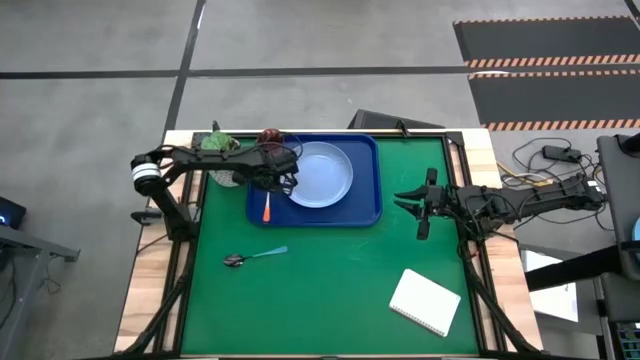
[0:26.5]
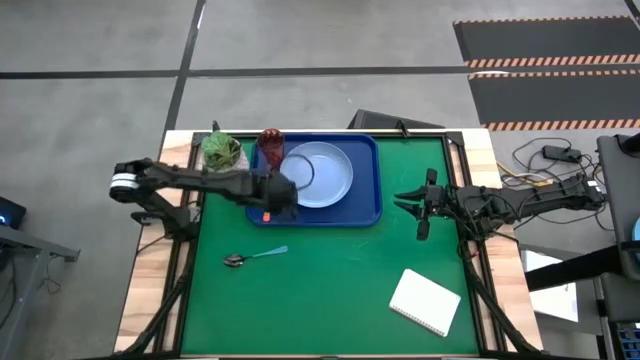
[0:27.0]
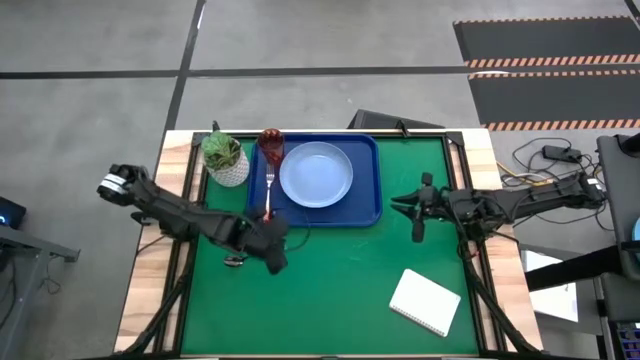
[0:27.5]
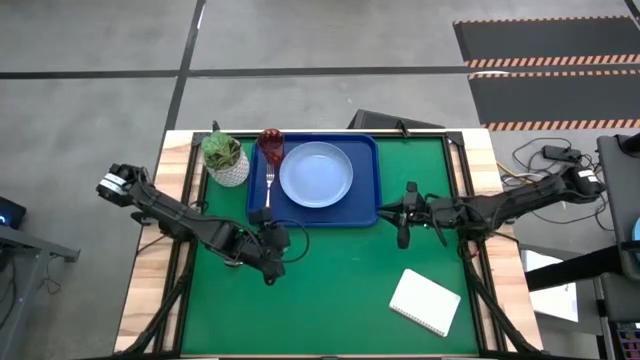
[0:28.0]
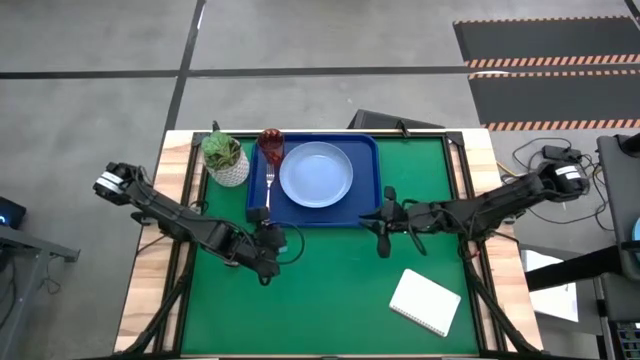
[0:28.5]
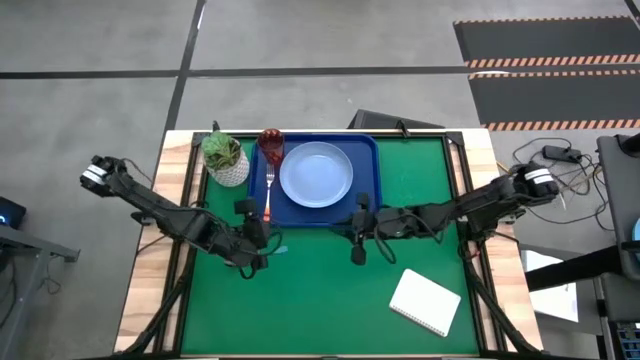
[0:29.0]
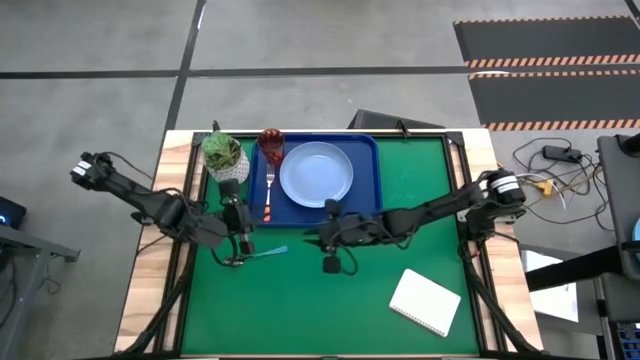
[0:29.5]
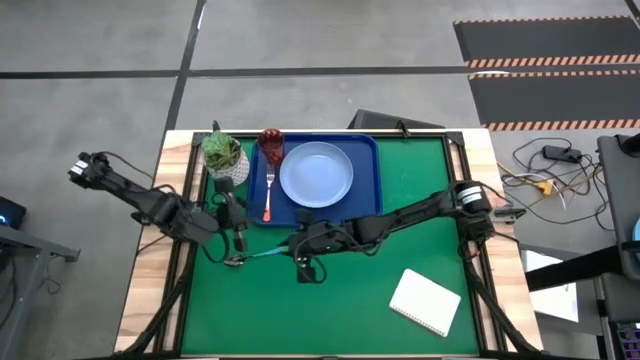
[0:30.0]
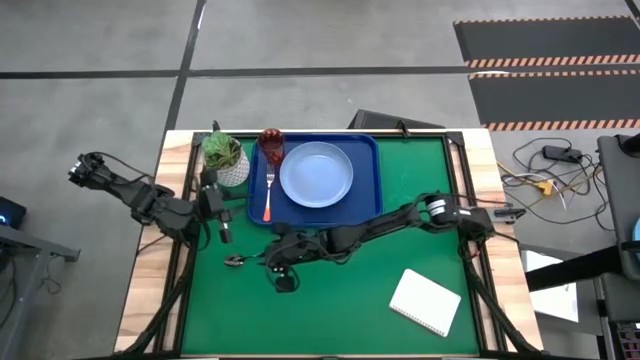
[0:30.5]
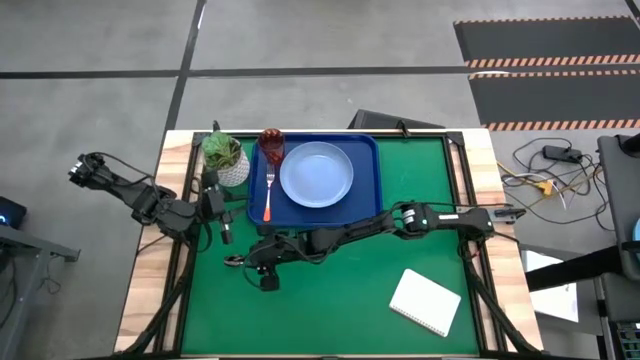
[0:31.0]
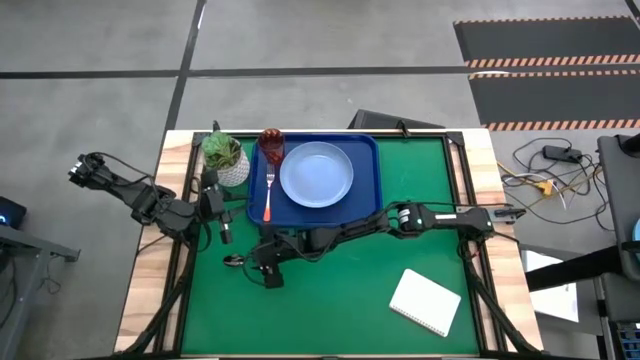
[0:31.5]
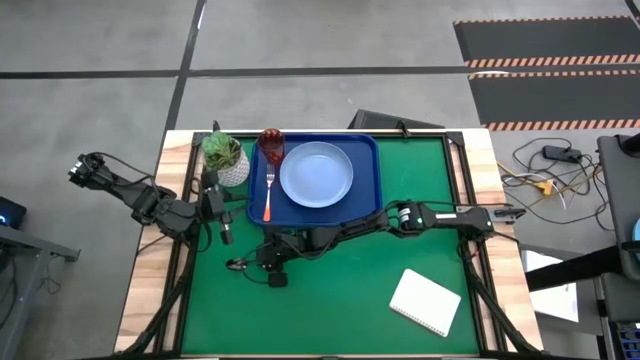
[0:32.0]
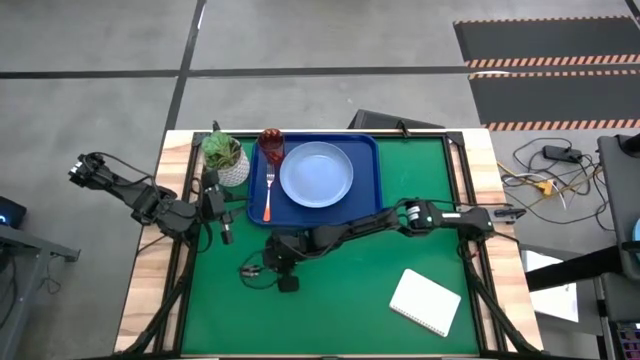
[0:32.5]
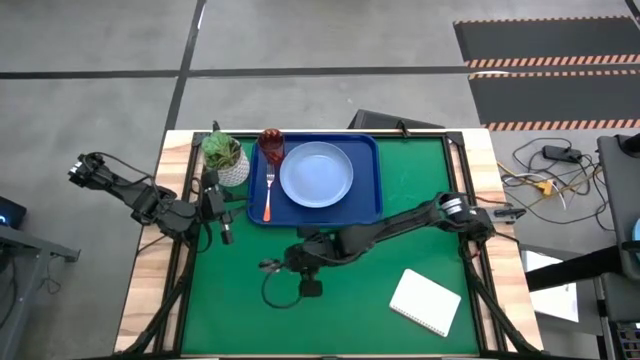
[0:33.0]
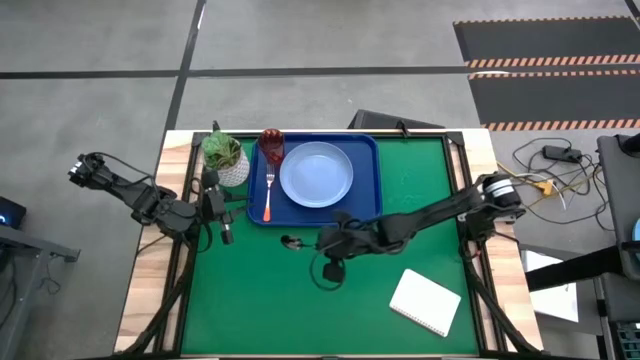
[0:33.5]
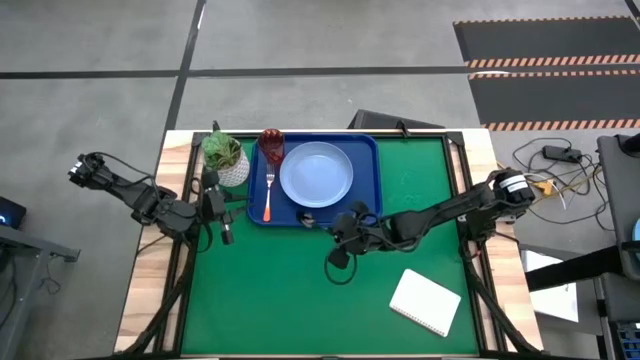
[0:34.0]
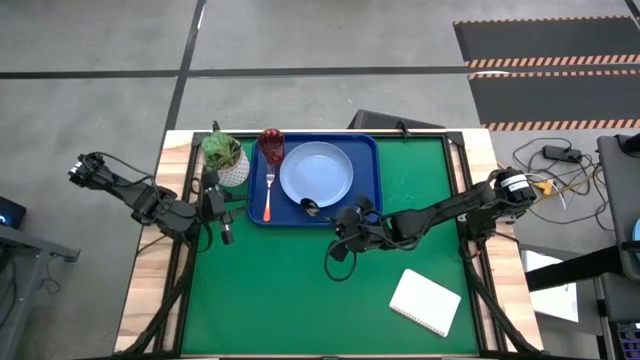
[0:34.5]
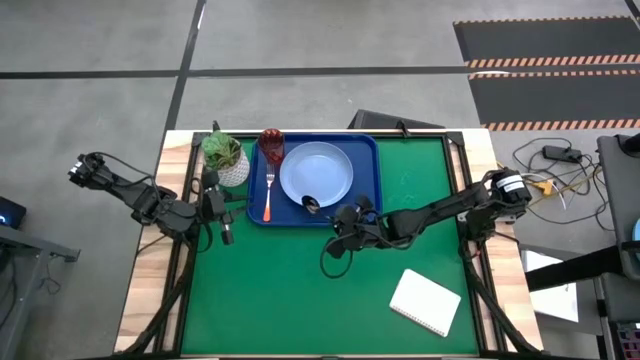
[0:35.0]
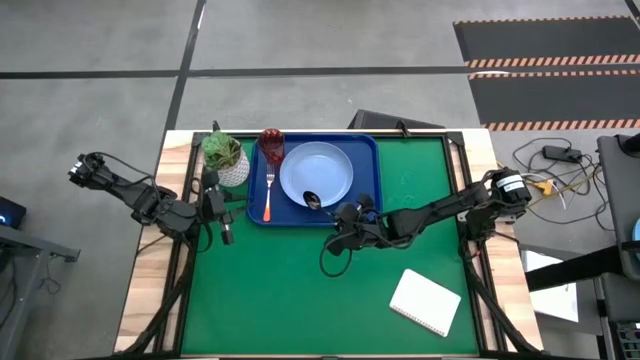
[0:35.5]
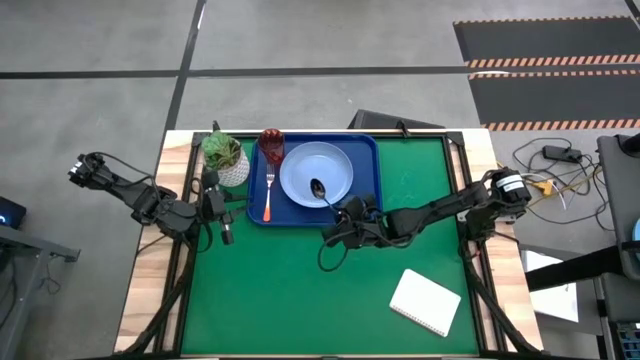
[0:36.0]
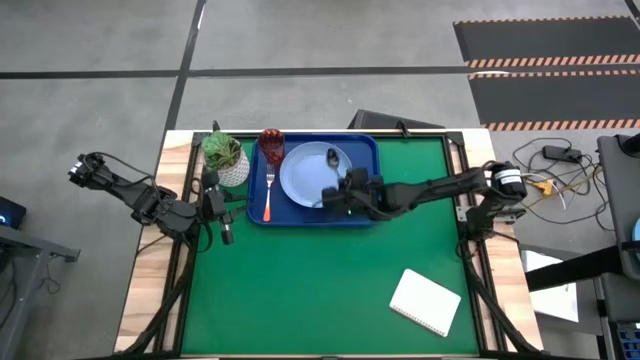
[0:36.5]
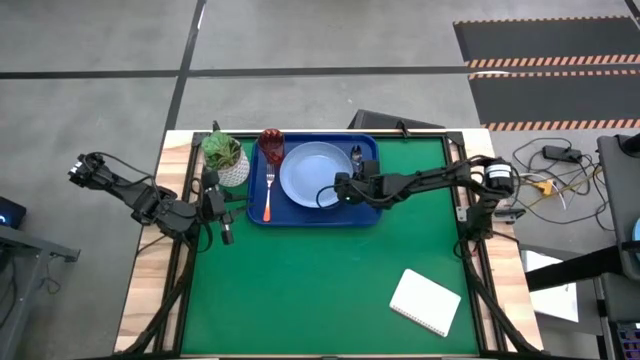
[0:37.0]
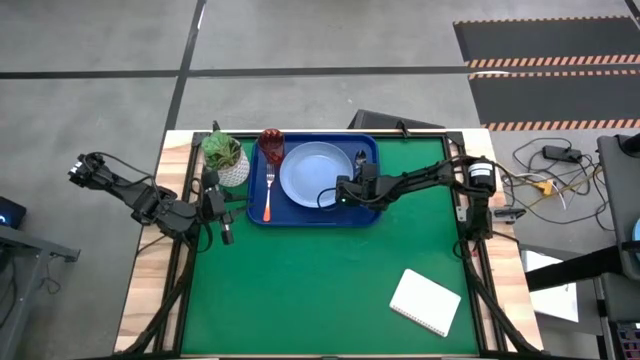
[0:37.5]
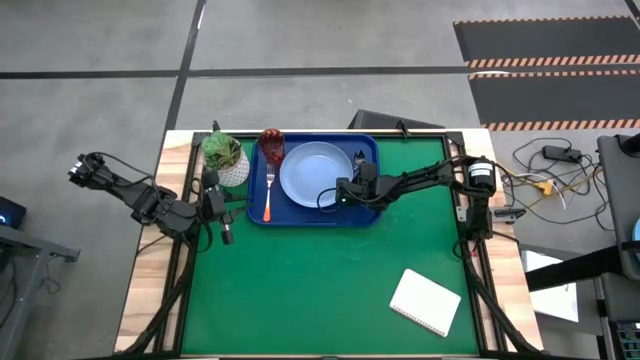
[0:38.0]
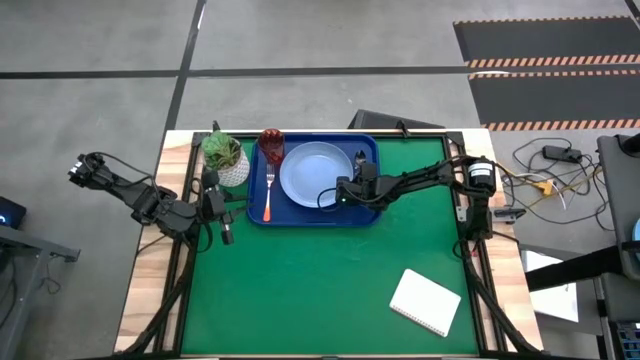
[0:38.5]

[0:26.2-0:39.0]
Task: Pick and place plate/cup/fork/spoon on tray
Put the spoon on the blue tray to the right of the plate

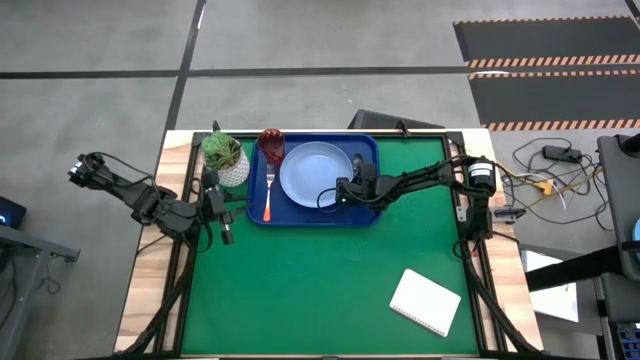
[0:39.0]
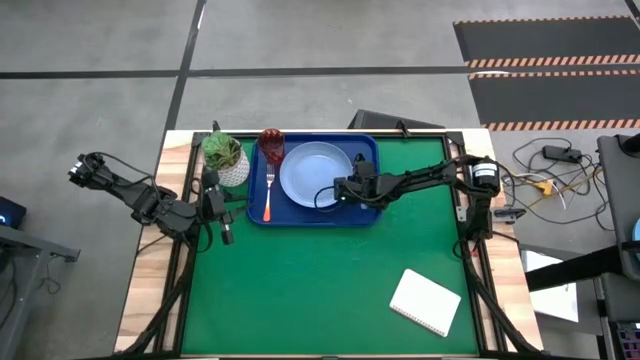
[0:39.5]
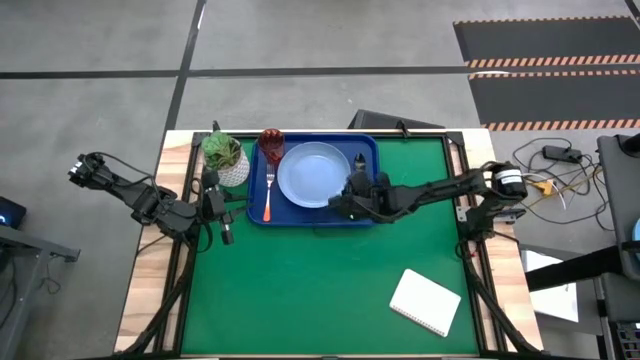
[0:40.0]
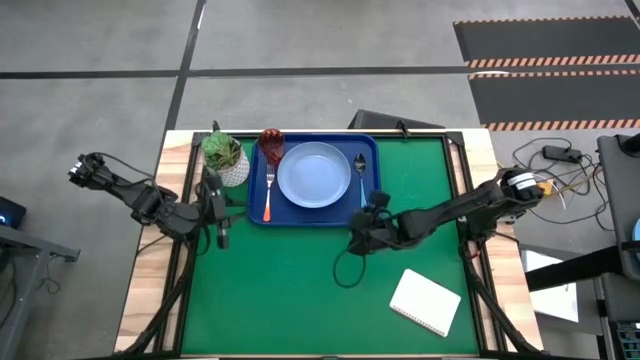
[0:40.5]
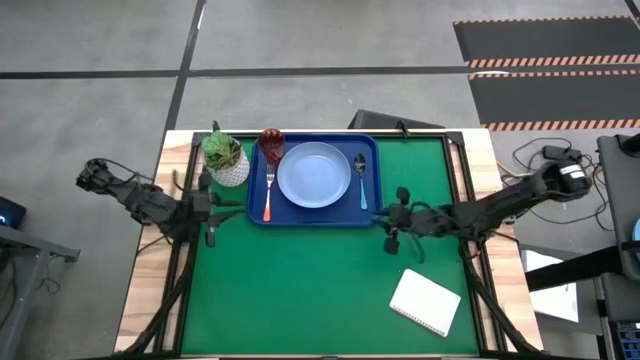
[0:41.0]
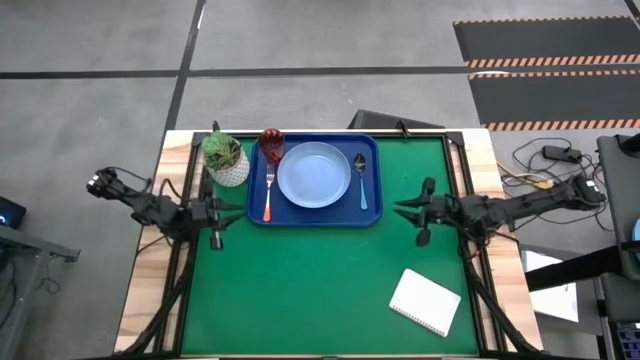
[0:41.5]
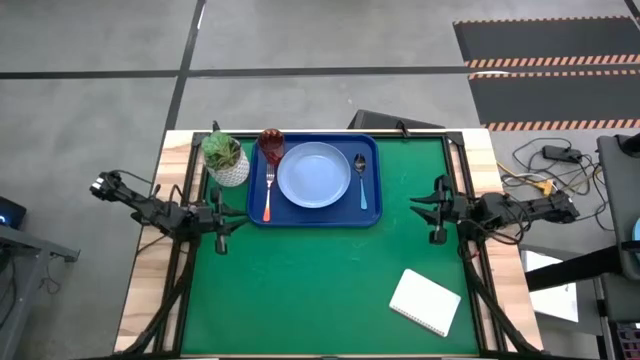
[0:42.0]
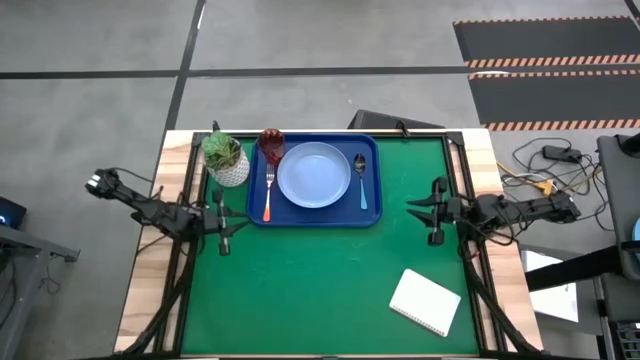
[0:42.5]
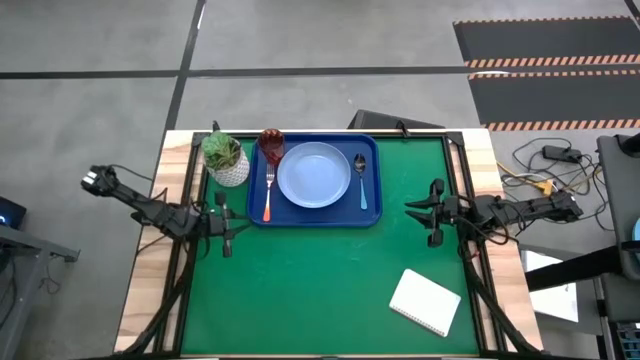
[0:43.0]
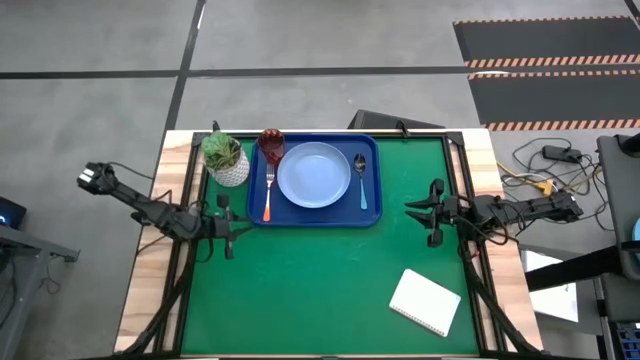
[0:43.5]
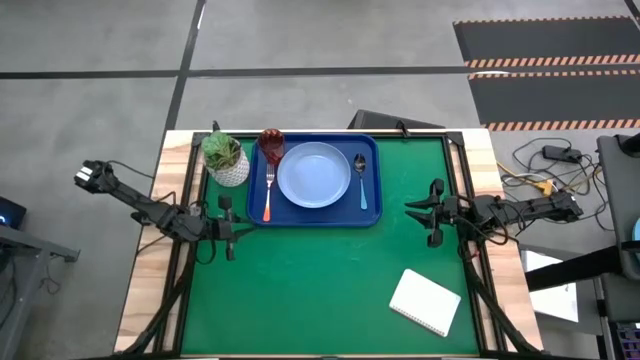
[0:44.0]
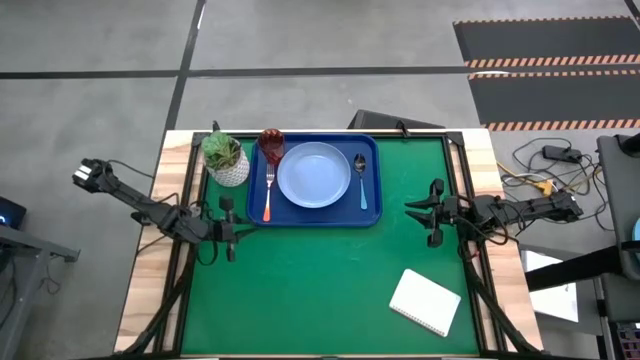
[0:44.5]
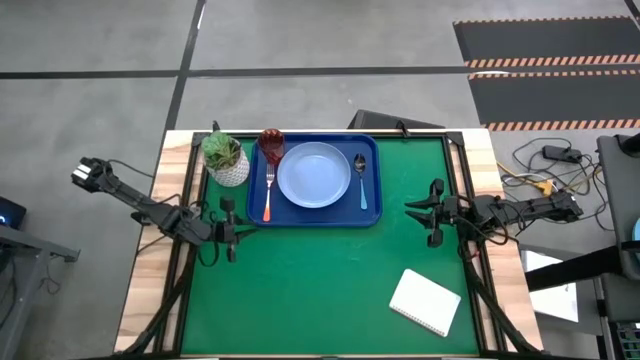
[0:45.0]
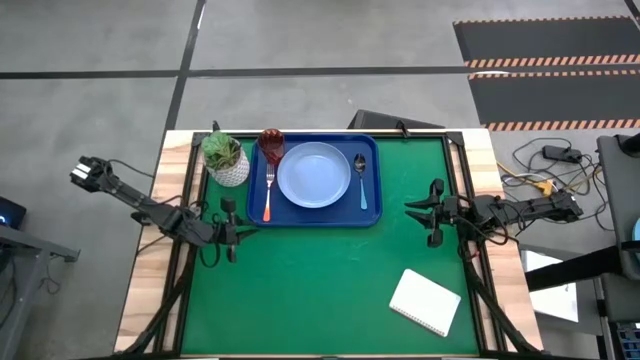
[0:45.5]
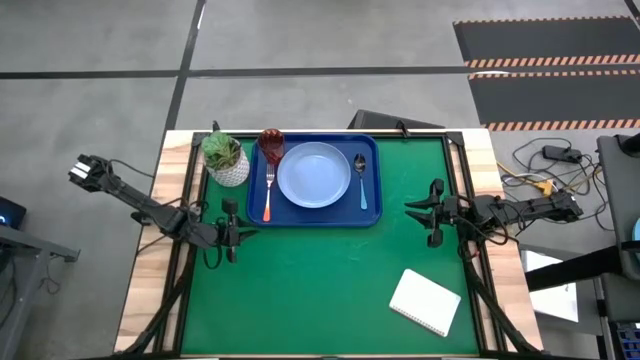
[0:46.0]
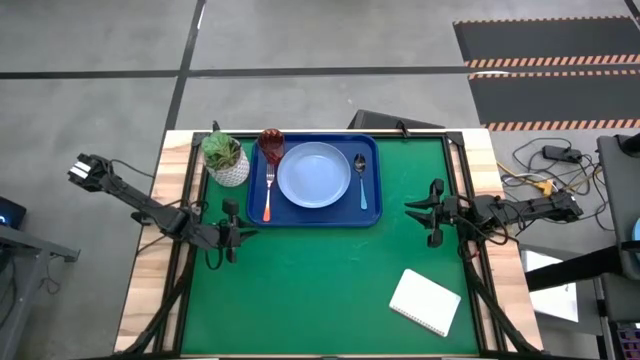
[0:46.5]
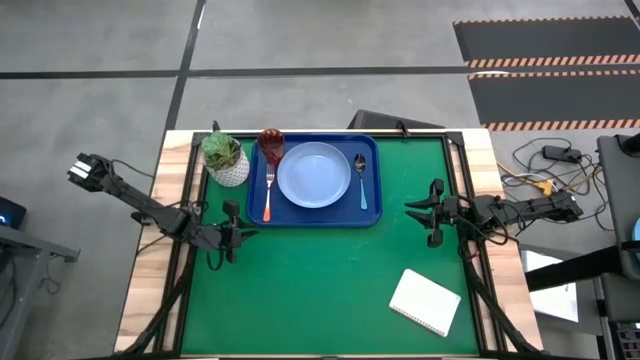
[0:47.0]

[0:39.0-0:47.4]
Return to Home Position
